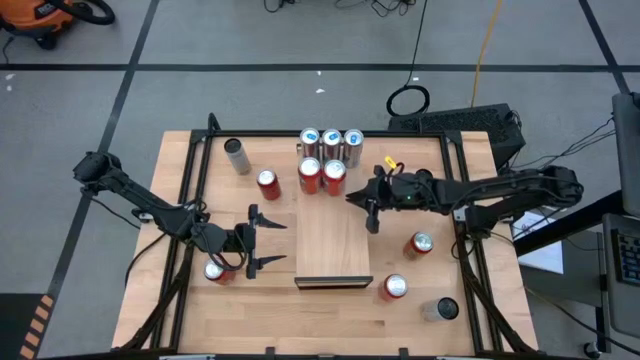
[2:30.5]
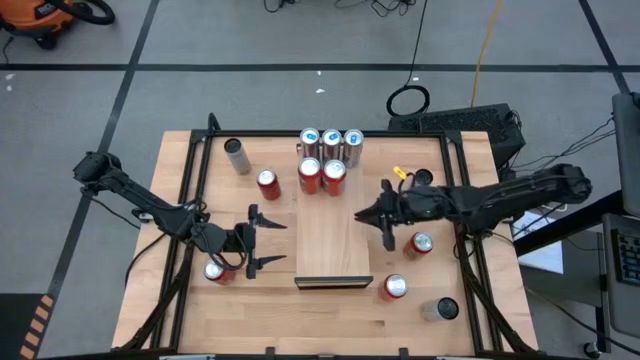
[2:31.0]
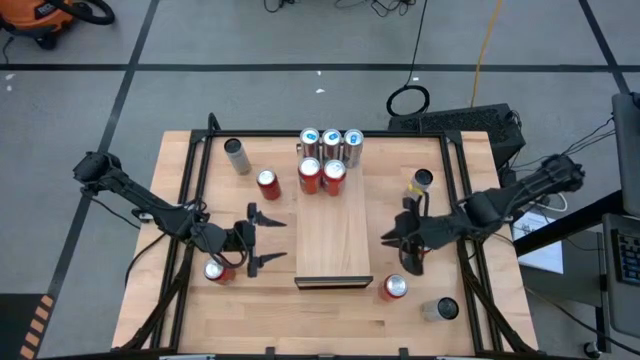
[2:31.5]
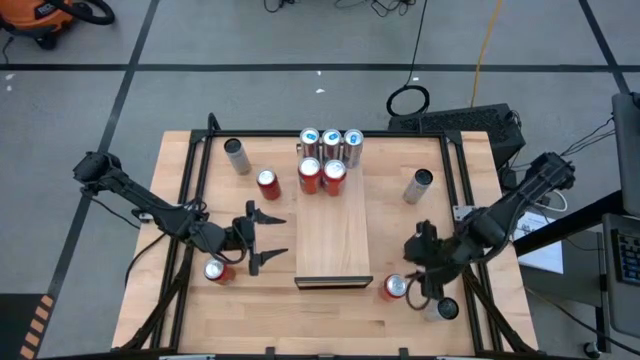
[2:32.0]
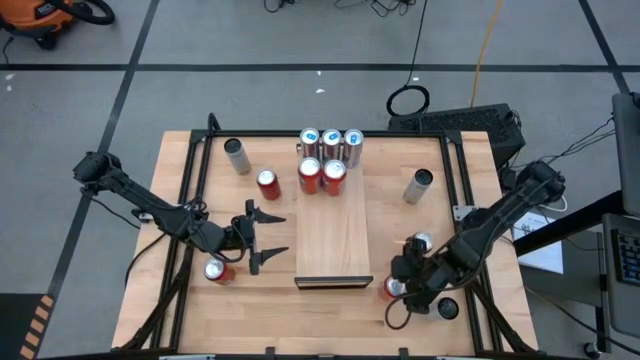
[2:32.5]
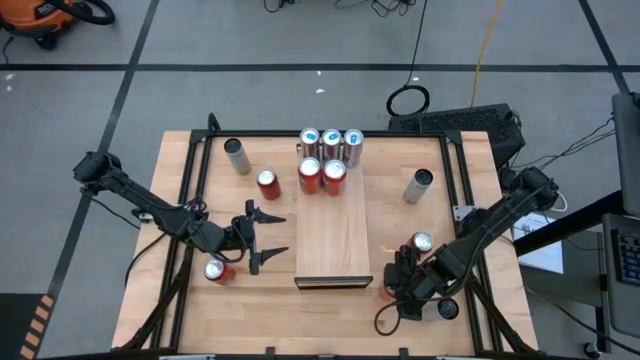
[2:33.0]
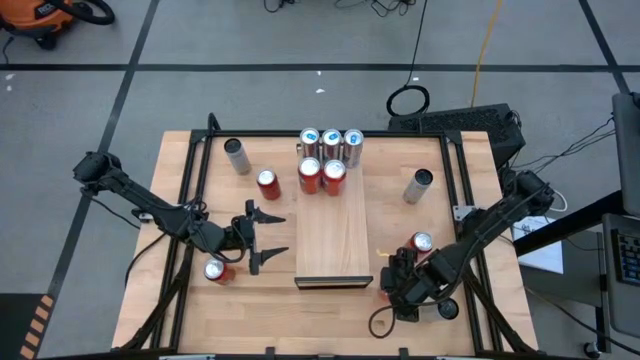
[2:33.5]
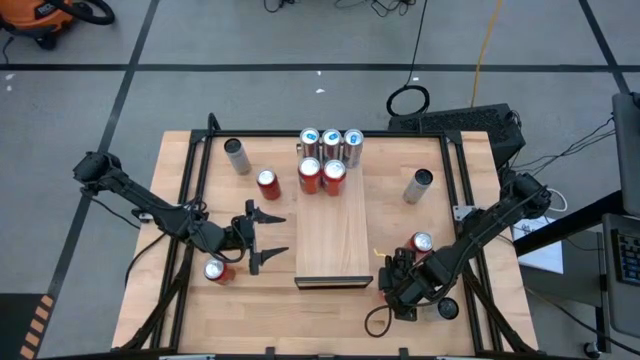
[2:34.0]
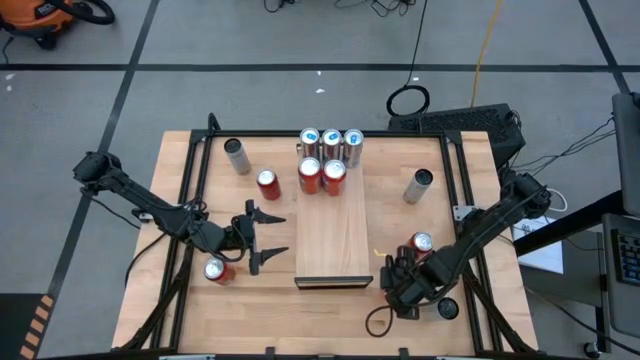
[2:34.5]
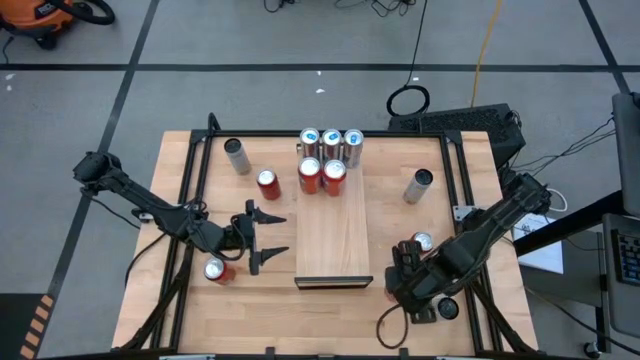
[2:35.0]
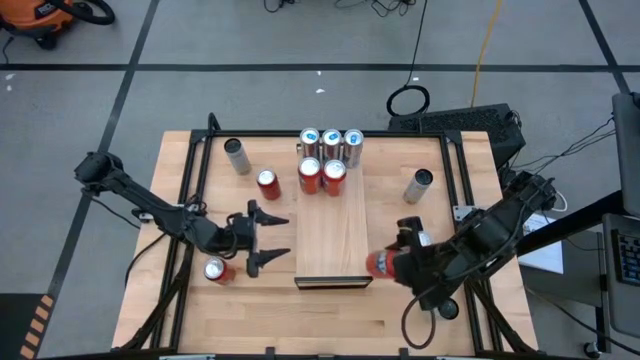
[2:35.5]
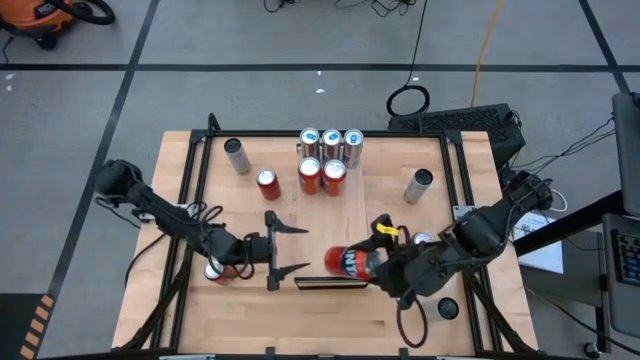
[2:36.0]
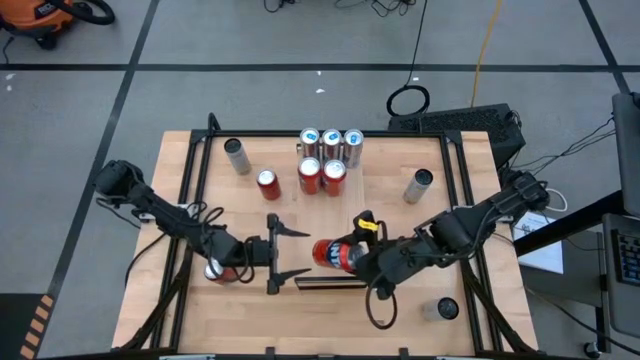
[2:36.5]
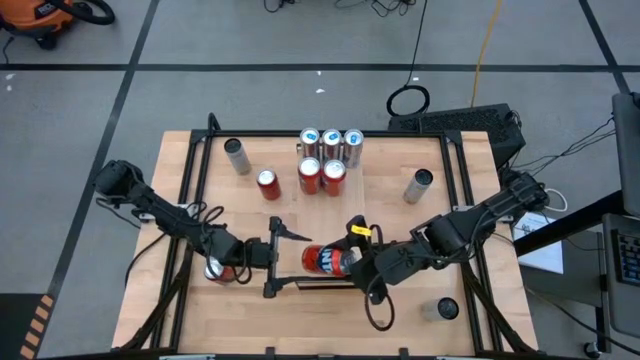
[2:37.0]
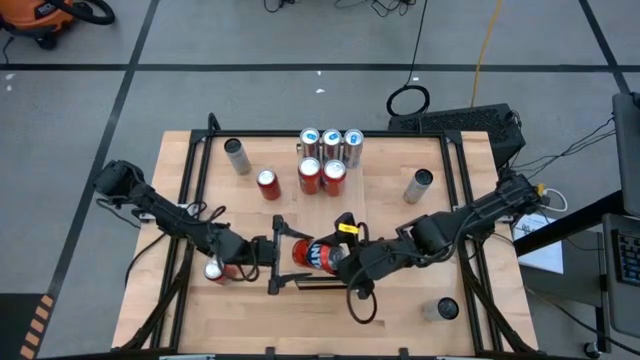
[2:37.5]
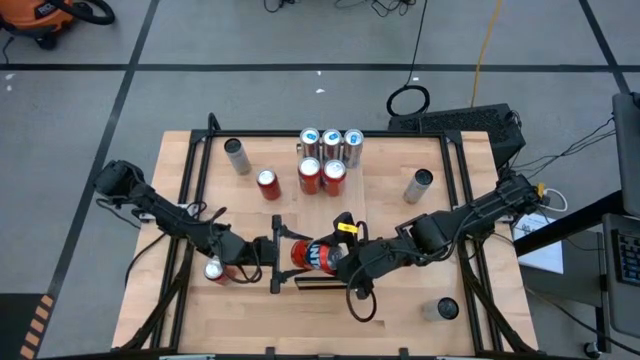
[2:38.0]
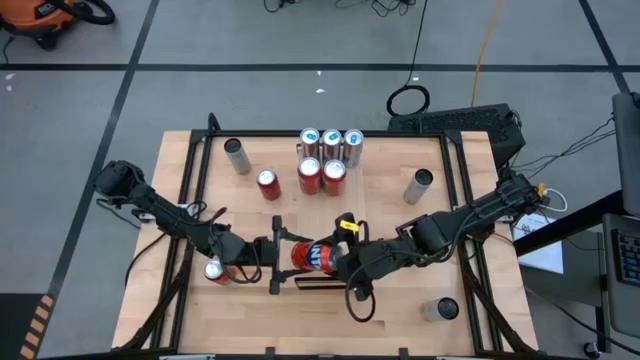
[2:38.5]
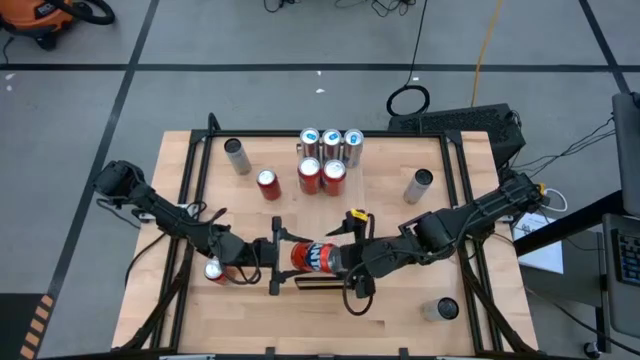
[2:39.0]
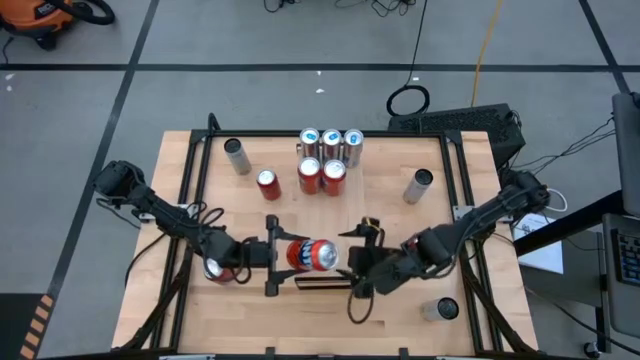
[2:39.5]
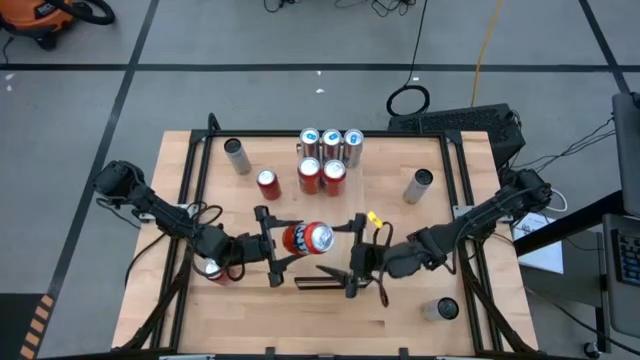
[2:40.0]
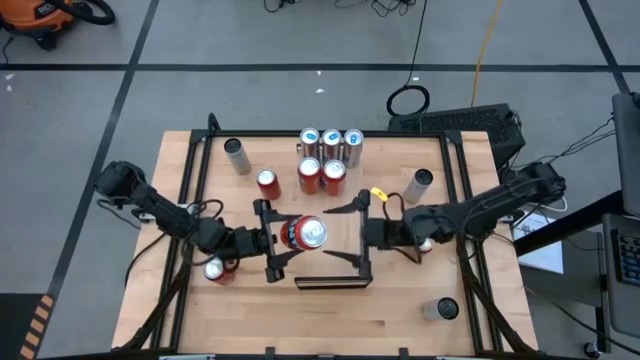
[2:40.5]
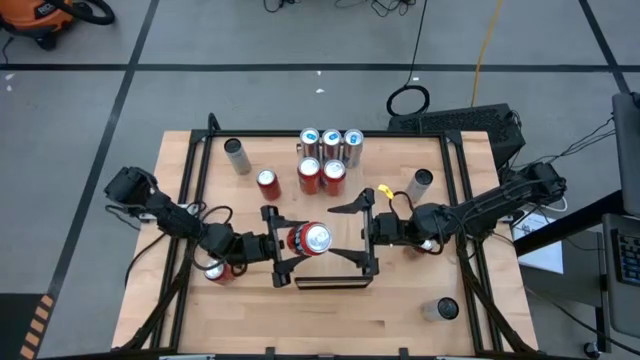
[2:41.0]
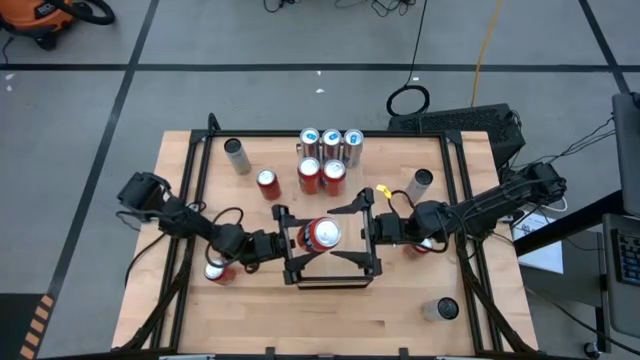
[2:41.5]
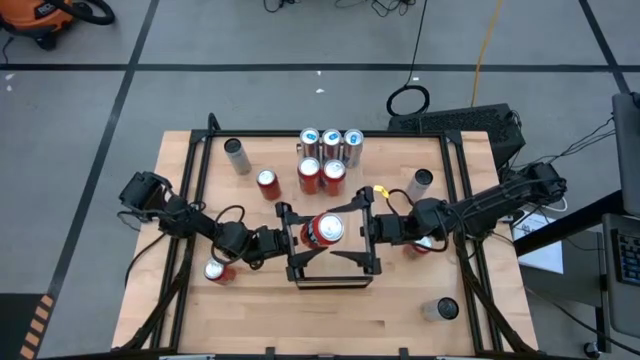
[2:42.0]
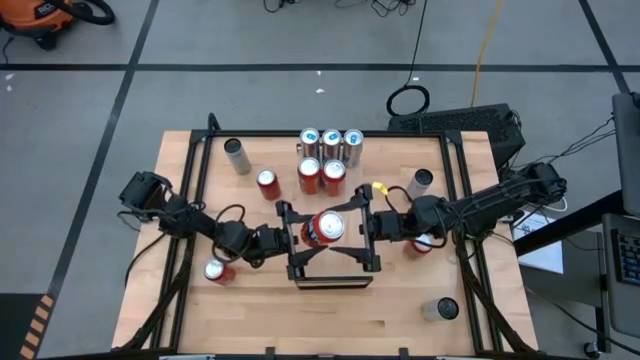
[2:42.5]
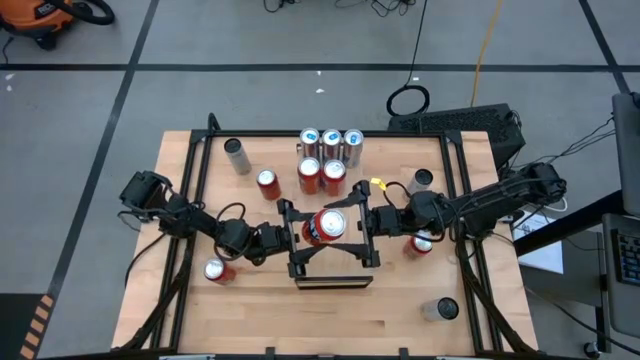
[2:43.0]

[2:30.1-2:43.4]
Task: Place canned beverage on shelf
Put the red soda can on the shelf aligned with the other red soda can

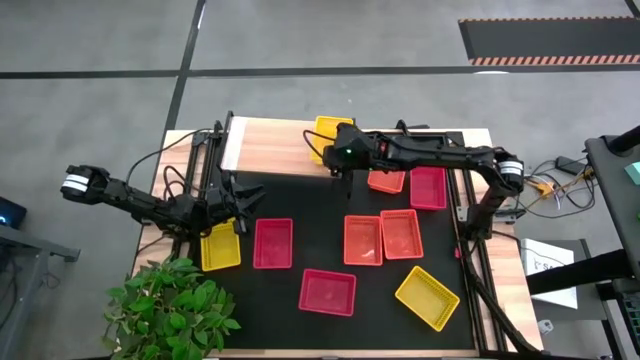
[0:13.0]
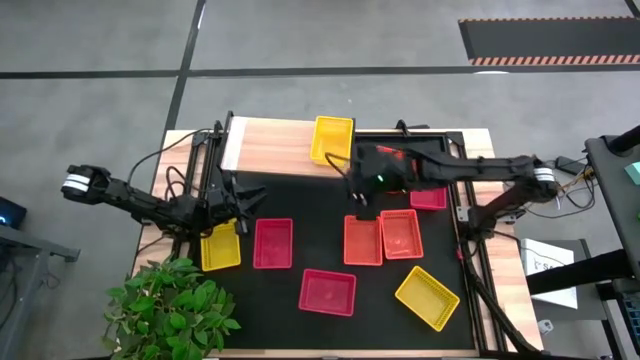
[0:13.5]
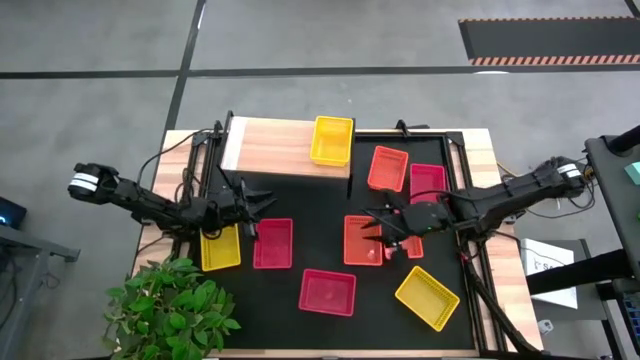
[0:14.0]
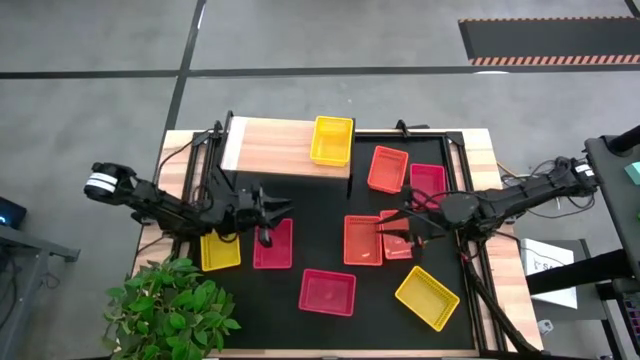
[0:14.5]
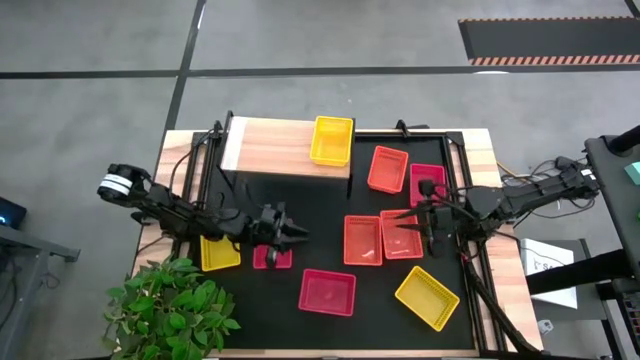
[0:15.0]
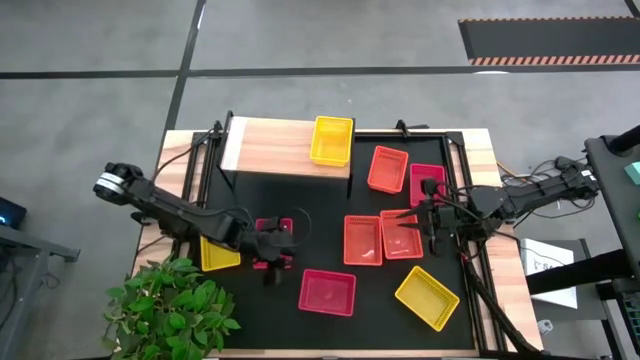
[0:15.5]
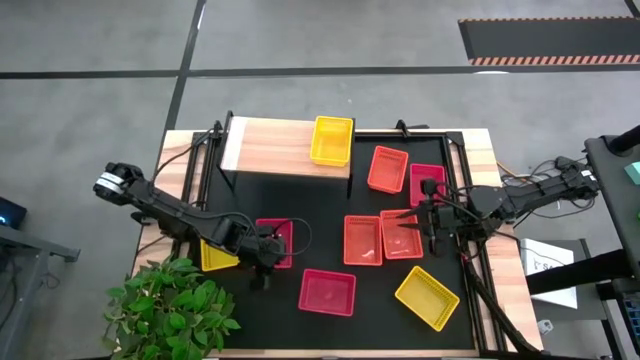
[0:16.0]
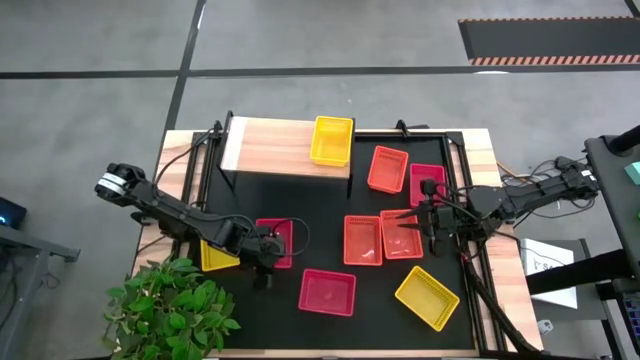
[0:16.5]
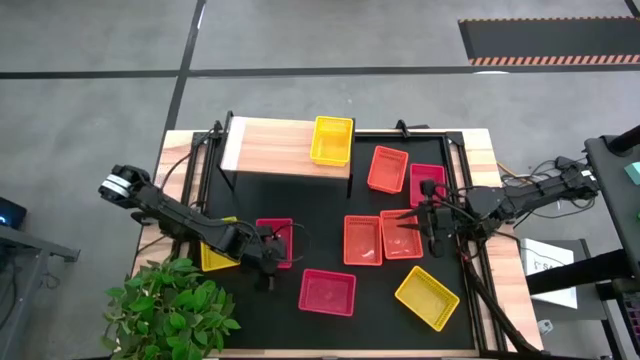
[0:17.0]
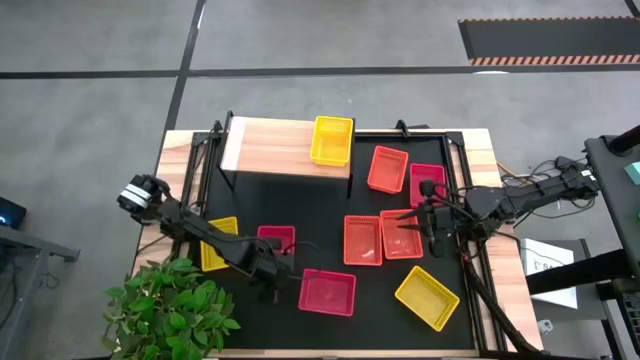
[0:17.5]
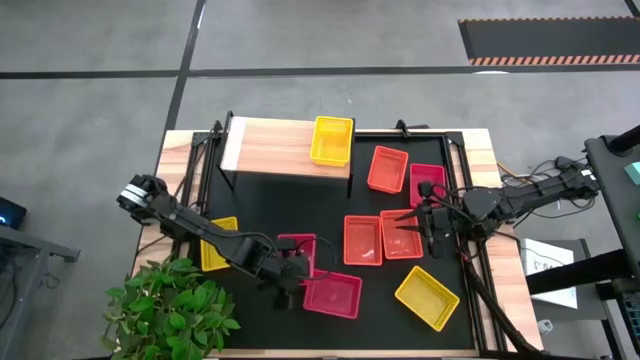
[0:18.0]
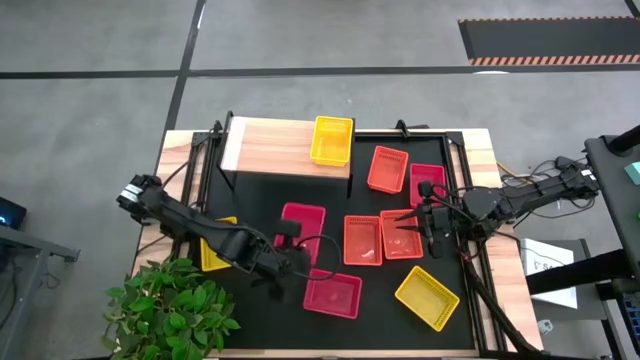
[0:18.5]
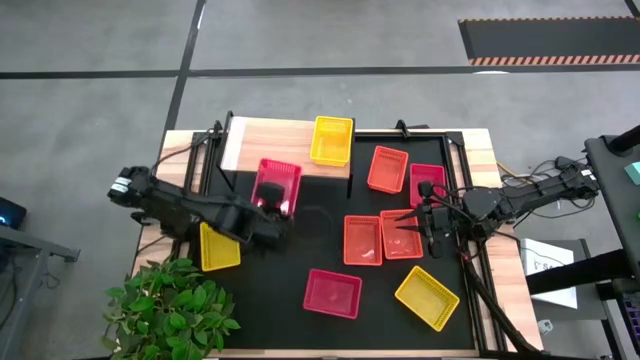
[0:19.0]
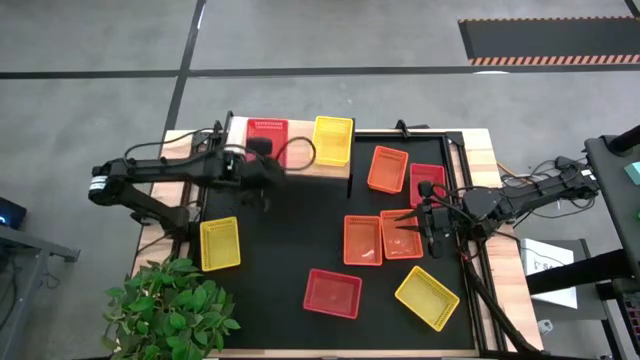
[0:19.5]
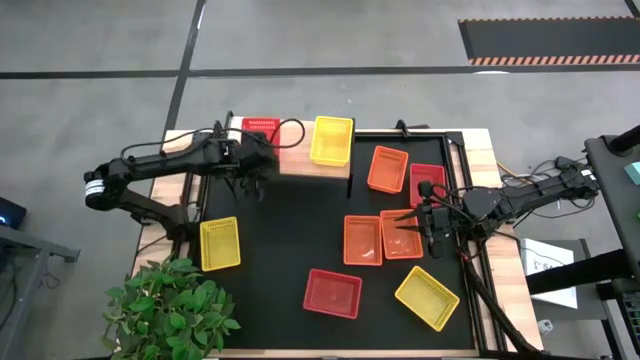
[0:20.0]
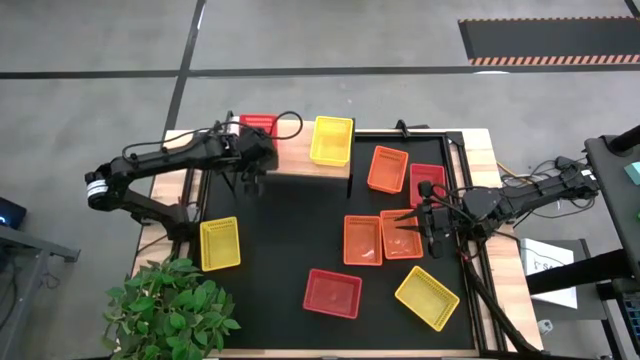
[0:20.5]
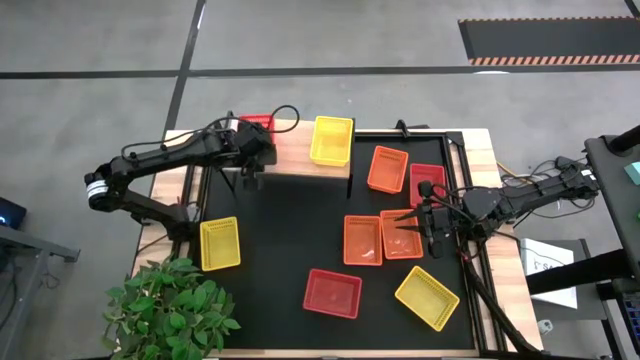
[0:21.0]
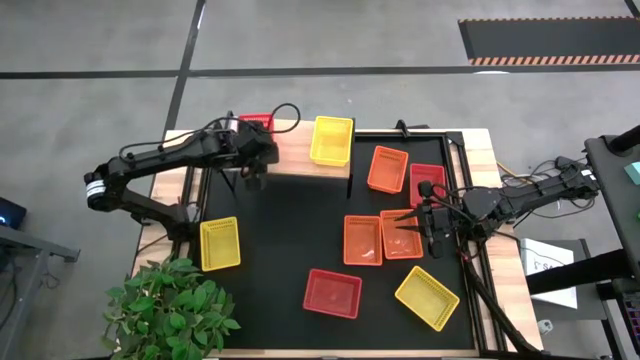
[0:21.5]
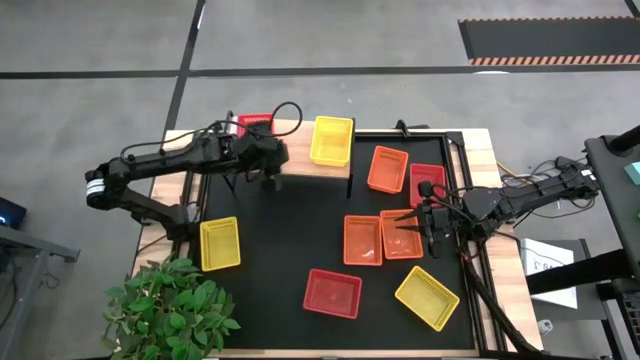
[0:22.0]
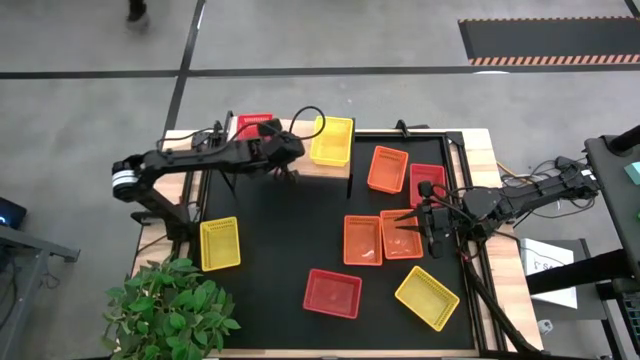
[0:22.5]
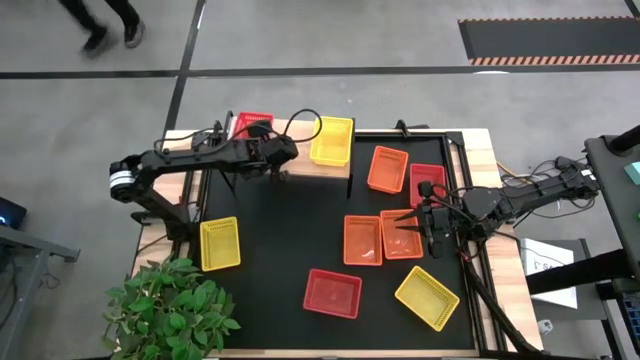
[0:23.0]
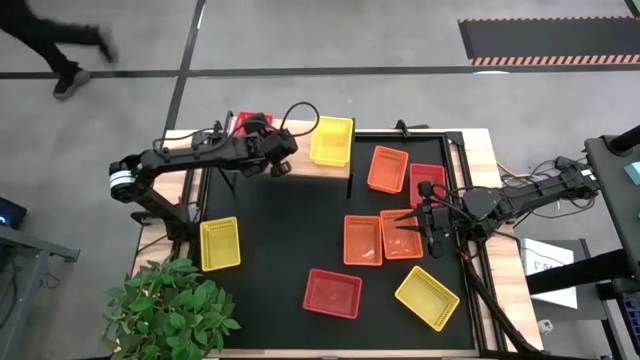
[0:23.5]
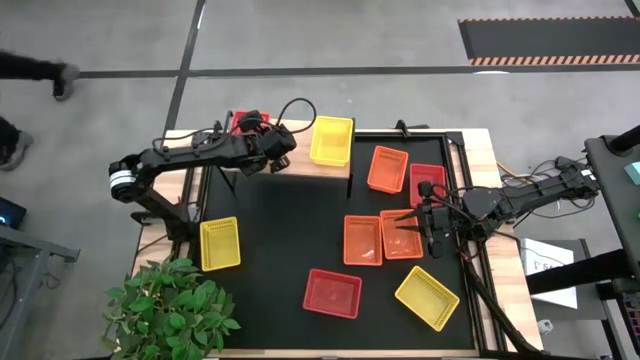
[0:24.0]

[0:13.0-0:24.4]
Task: Stack baskets on shelf by color
Put the left red bin on the shelf
